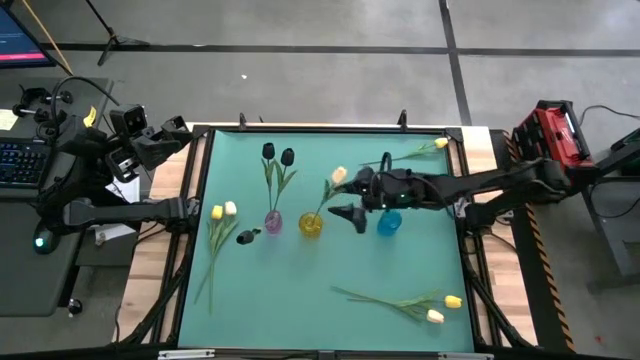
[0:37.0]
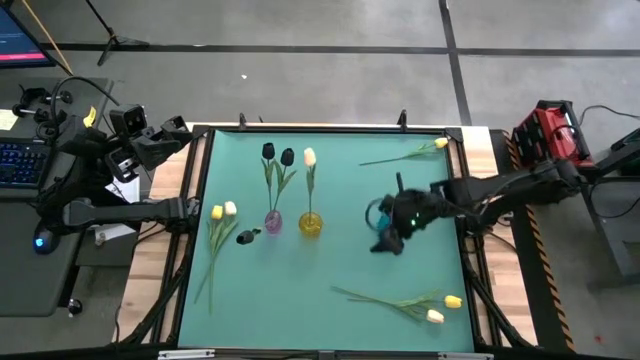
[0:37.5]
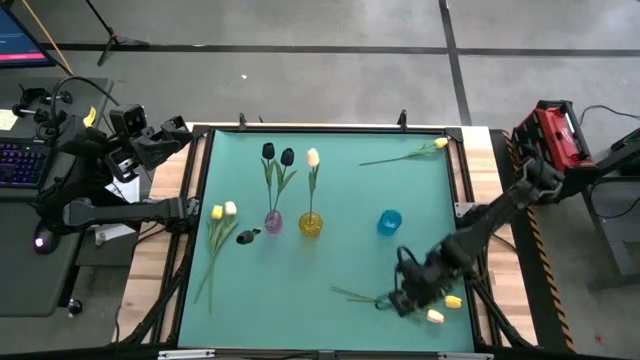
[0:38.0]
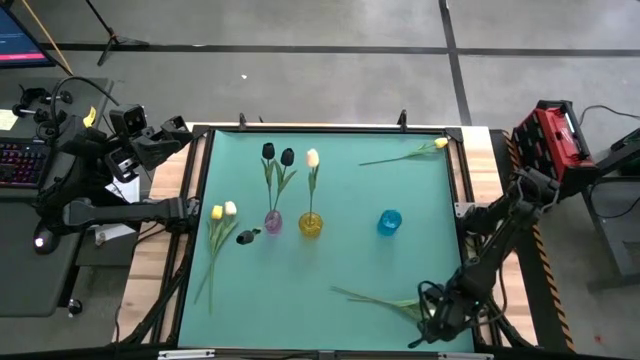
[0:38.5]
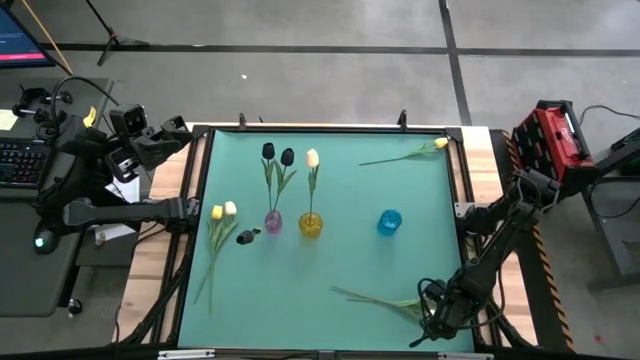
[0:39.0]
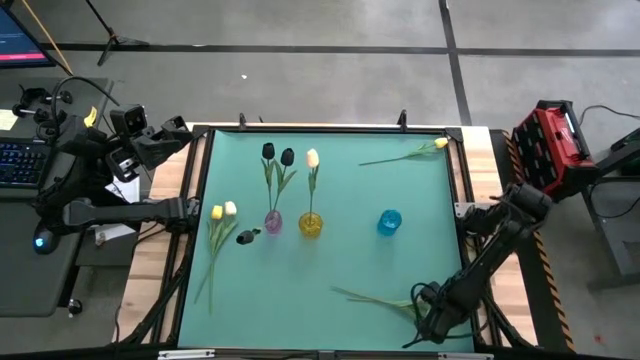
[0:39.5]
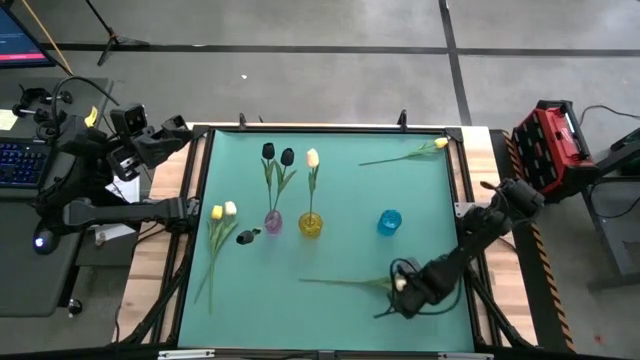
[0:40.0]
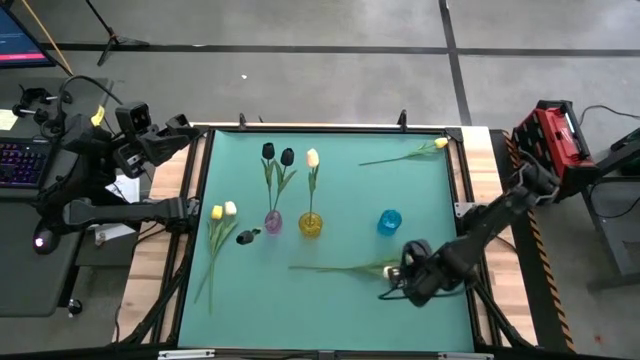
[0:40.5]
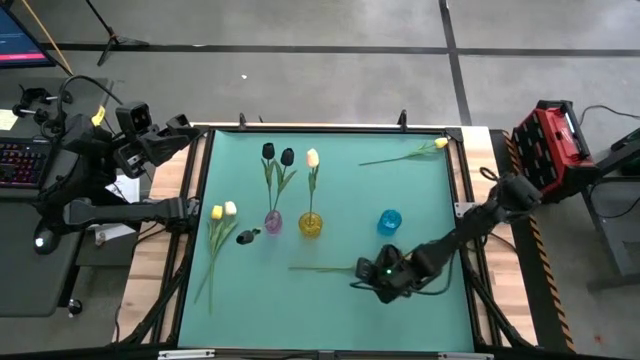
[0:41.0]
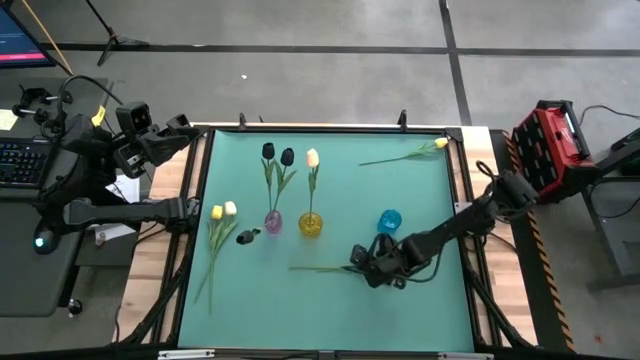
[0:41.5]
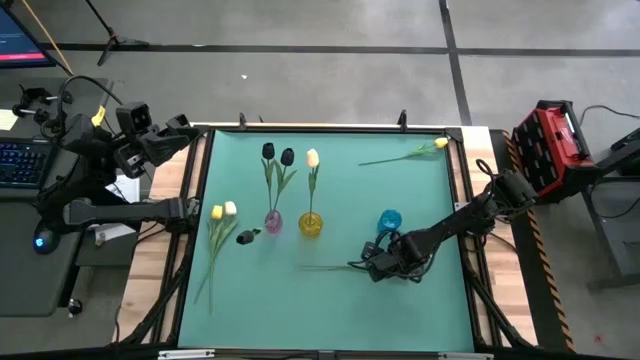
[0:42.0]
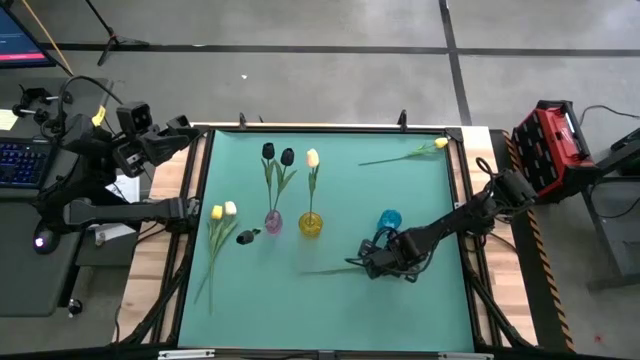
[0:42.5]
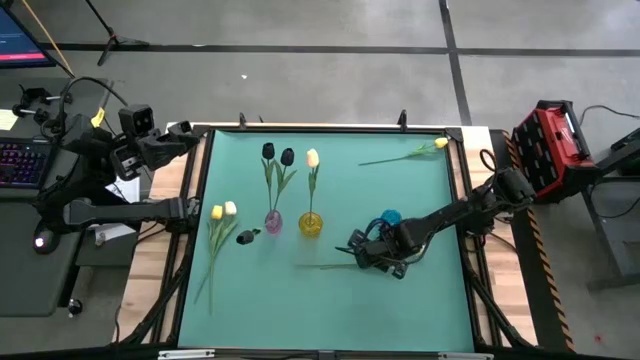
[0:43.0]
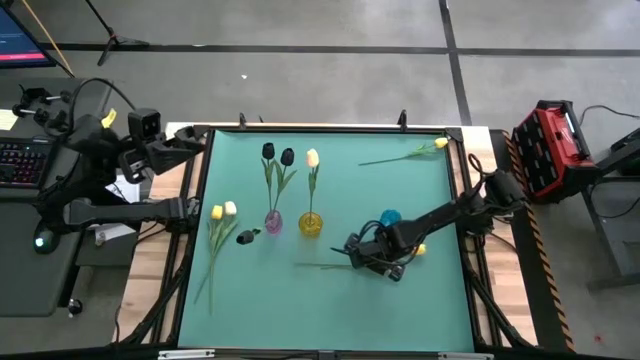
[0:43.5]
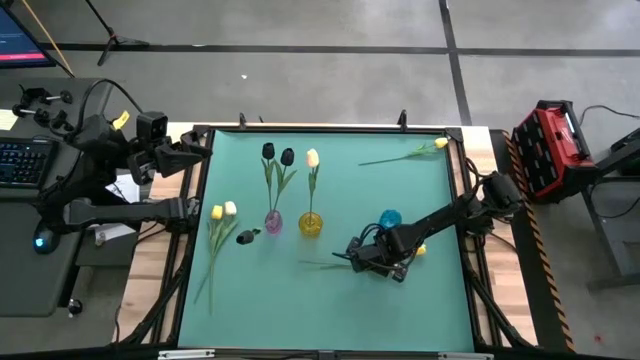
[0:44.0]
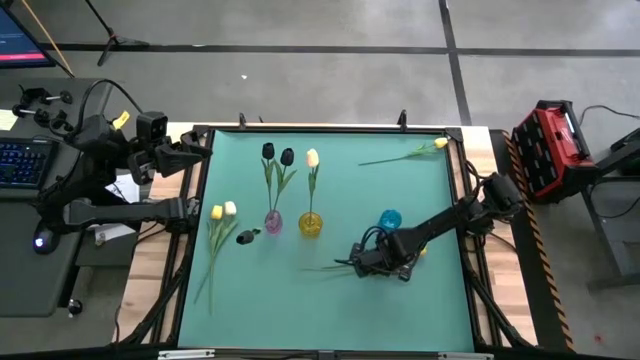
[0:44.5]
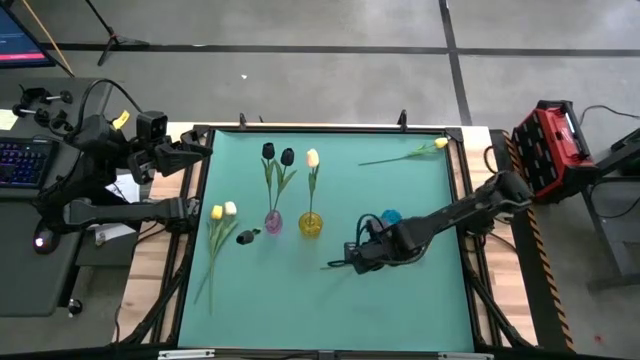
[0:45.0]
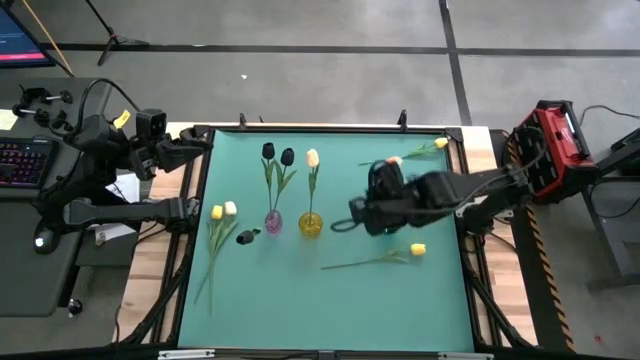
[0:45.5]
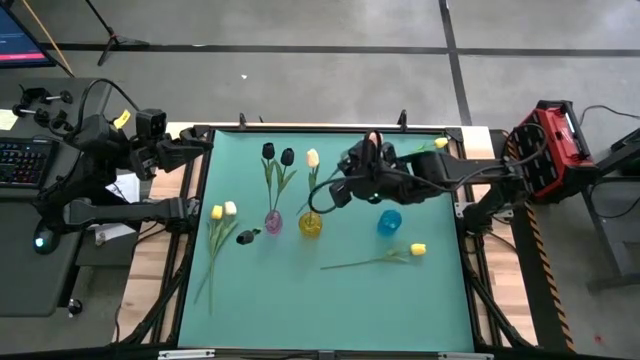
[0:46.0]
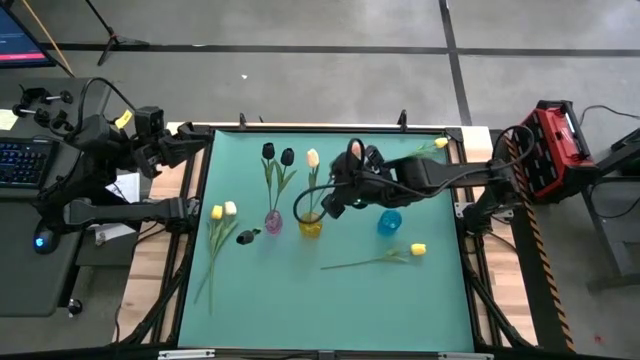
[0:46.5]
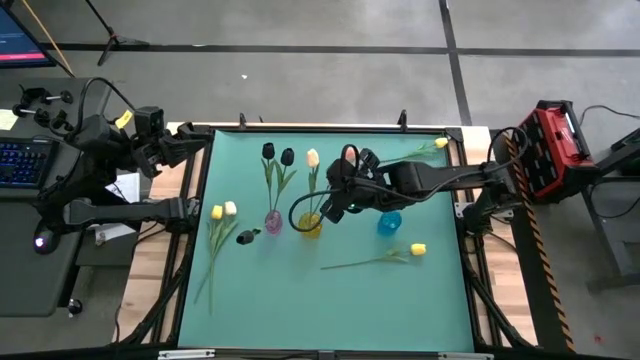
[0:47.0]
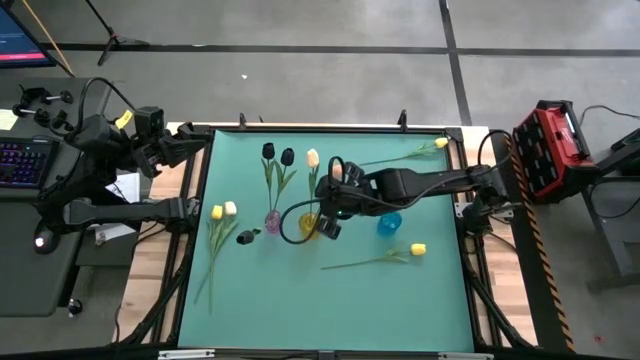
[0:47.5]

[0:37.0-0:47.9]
Task: Sort flowers into vase by color
Put the right white tulip into the yellow vase

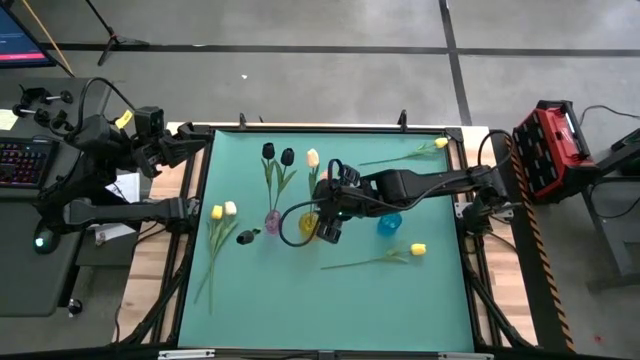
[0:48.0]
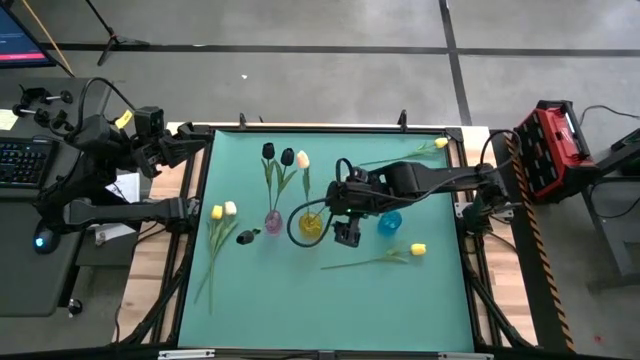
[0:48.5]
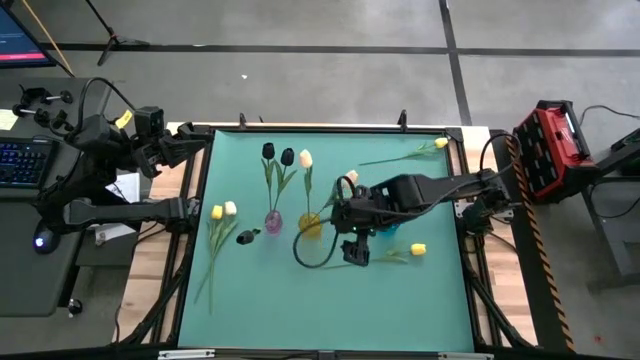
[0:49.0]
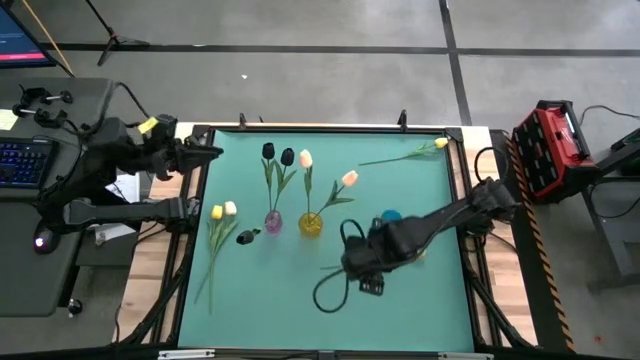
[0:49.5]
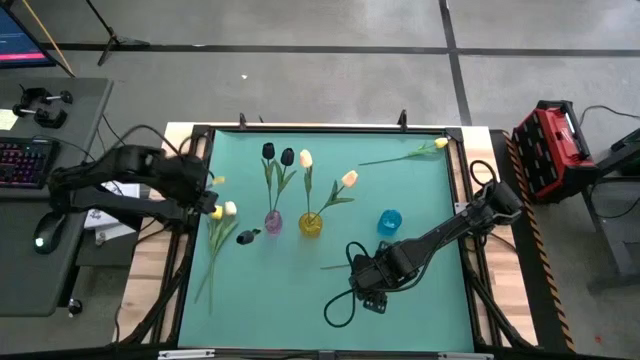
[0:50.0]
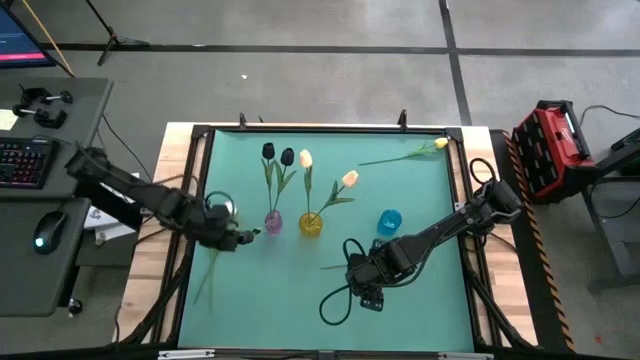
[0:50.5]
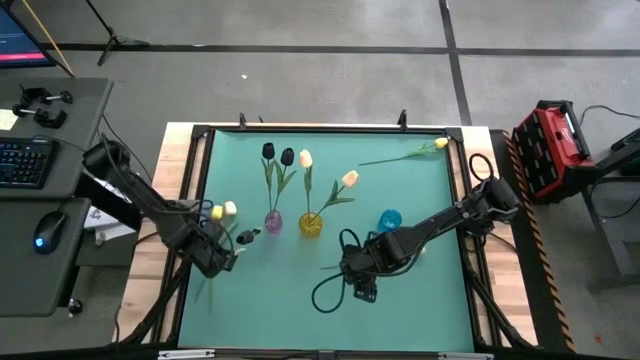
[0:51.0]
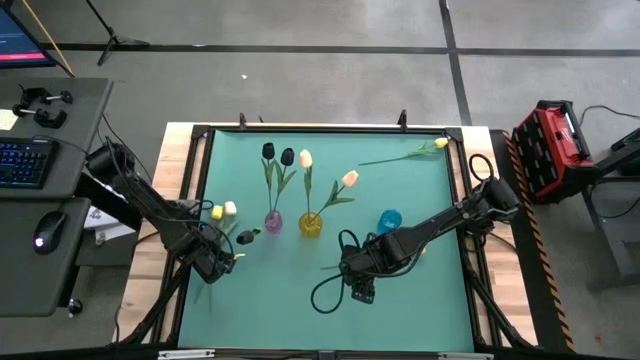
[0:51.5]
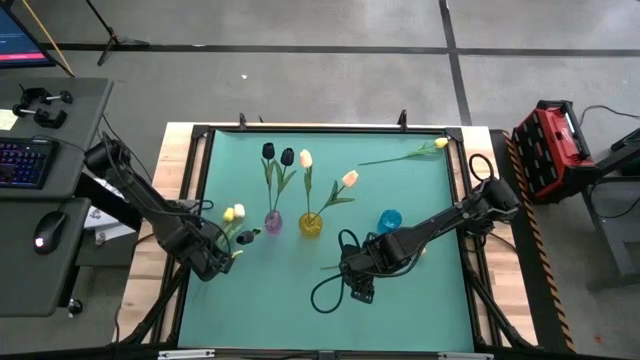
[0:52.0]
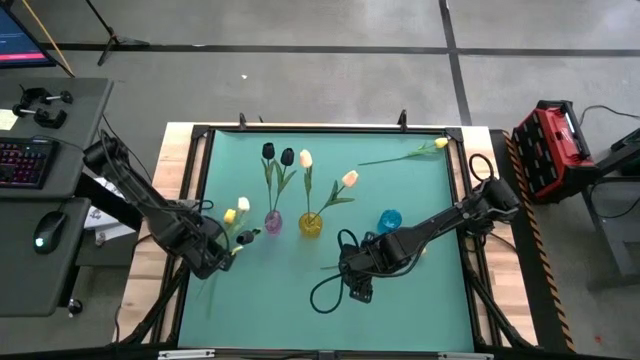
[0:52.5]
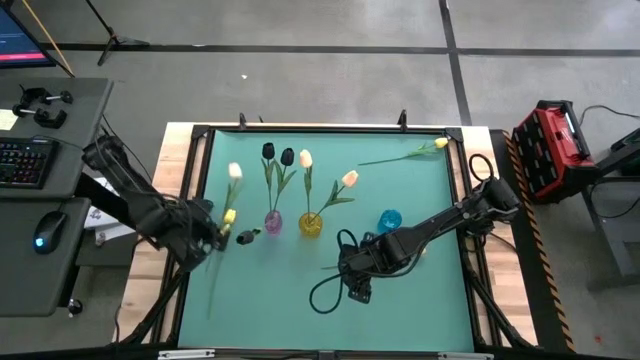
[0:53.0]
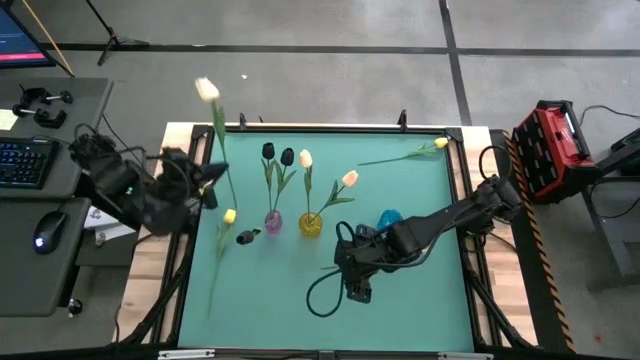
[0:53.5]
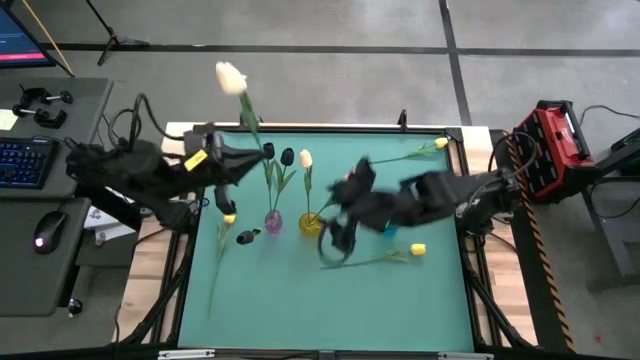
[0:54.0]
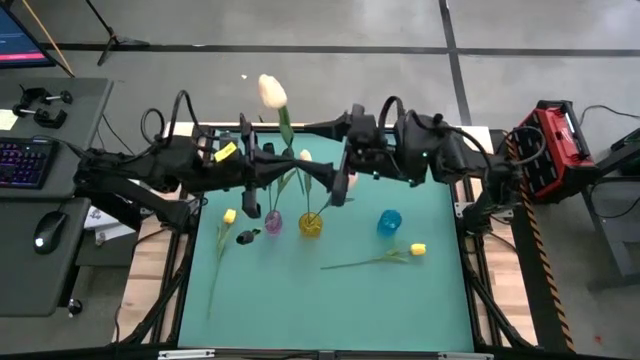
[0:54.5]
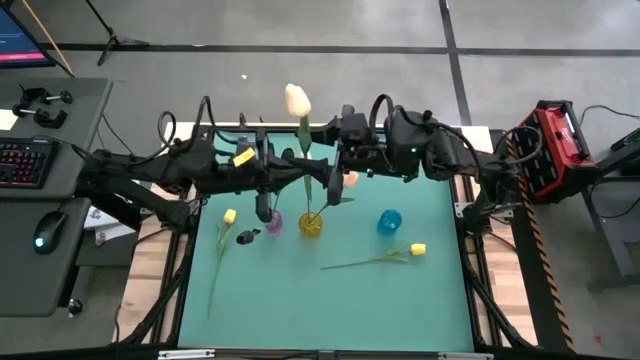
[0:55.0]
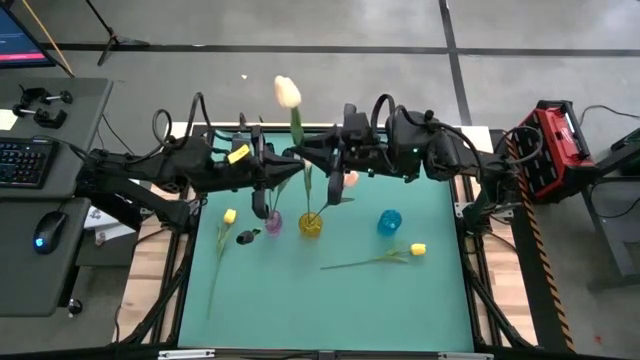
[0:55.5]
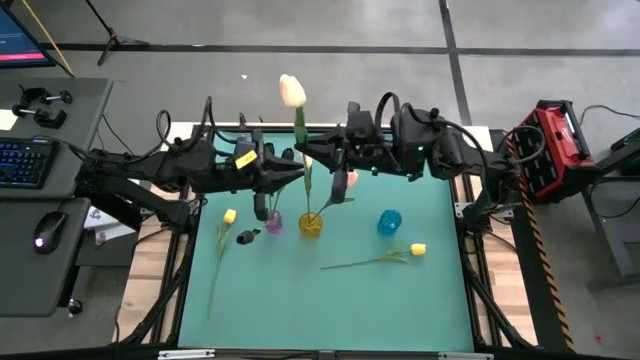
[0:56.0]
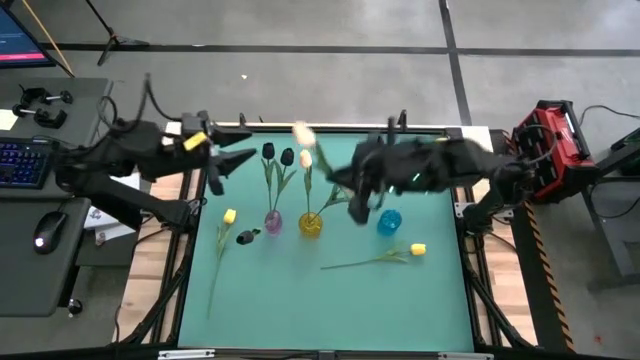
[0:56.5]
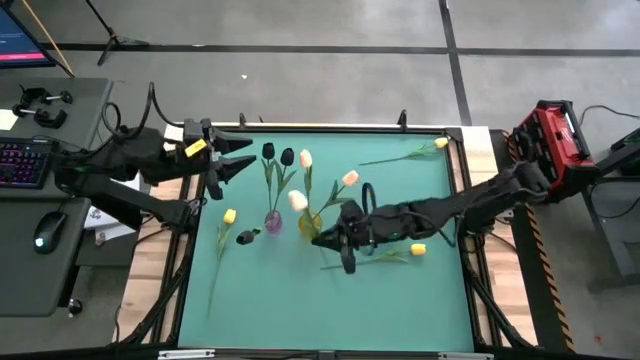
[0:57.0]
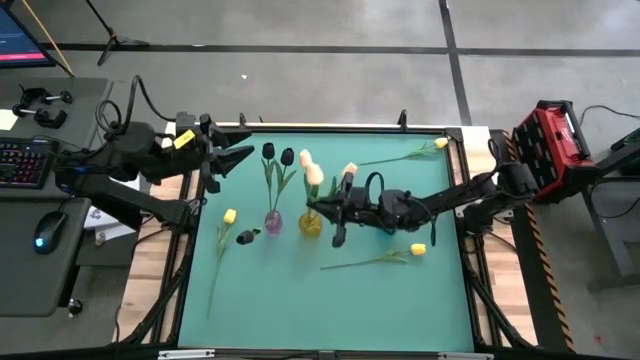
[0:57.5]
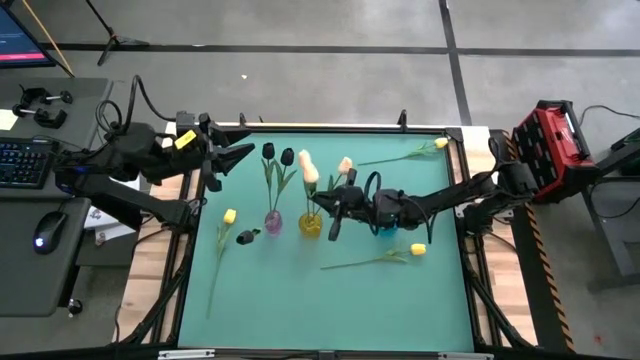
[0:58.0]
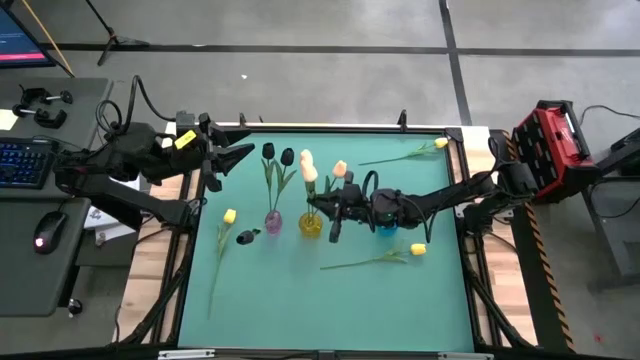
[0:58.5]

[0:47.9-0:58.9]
Put the white tulip into the yellow vase
